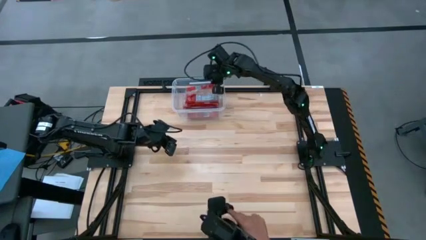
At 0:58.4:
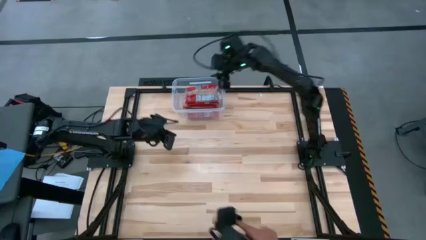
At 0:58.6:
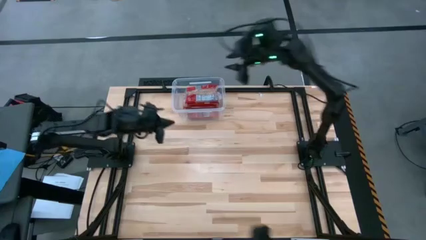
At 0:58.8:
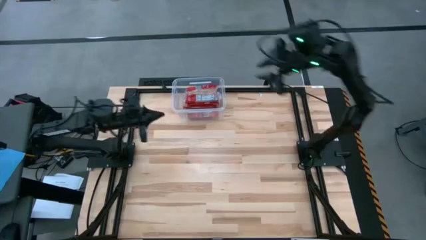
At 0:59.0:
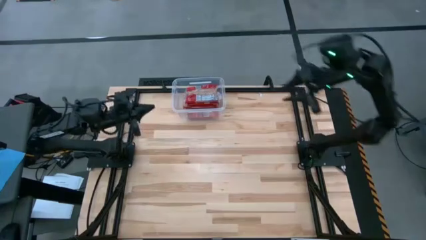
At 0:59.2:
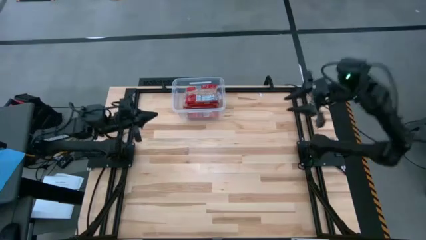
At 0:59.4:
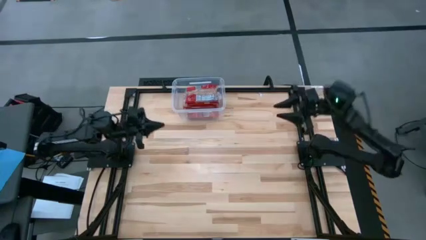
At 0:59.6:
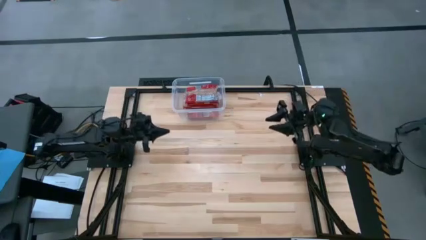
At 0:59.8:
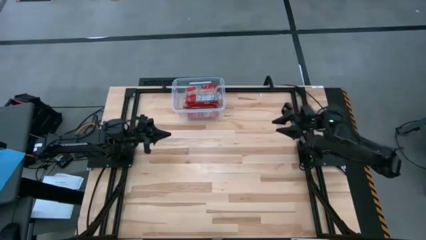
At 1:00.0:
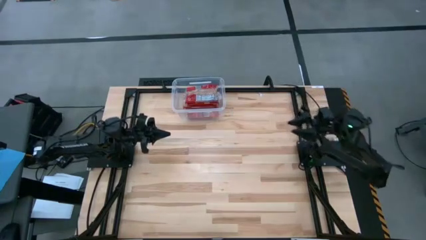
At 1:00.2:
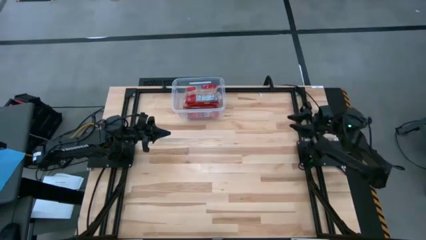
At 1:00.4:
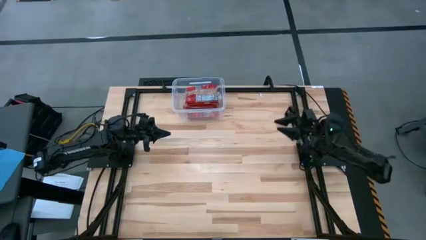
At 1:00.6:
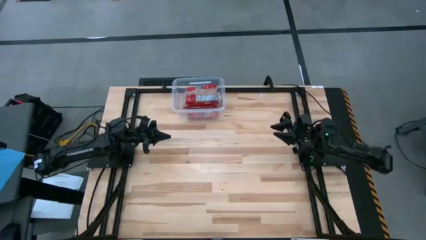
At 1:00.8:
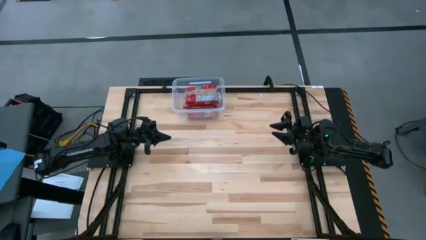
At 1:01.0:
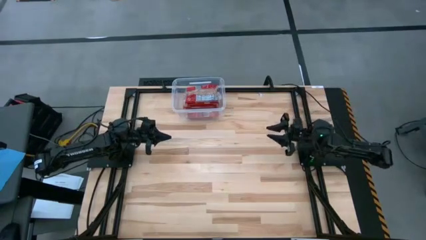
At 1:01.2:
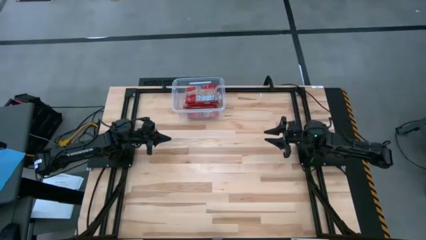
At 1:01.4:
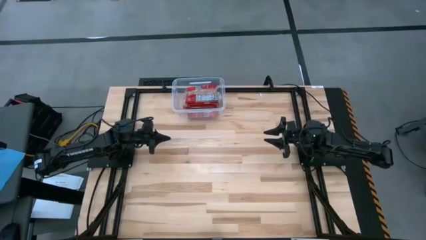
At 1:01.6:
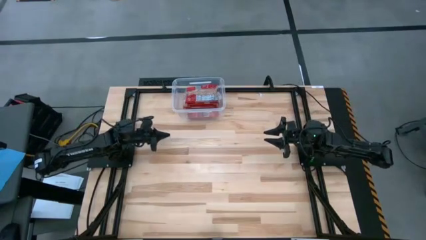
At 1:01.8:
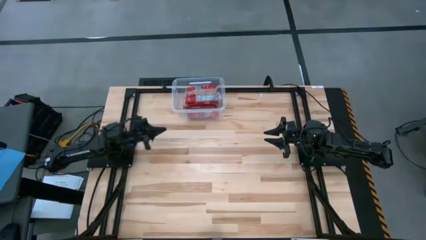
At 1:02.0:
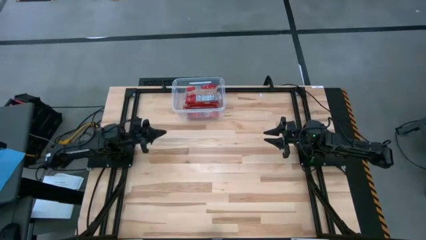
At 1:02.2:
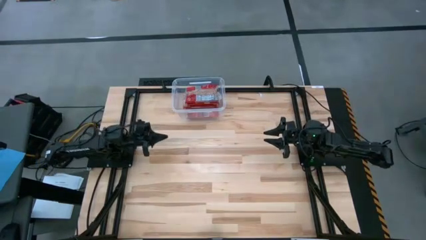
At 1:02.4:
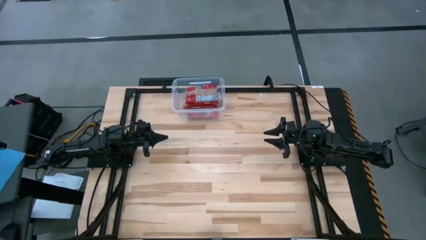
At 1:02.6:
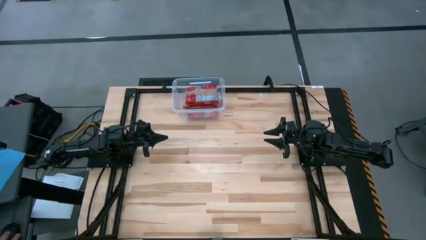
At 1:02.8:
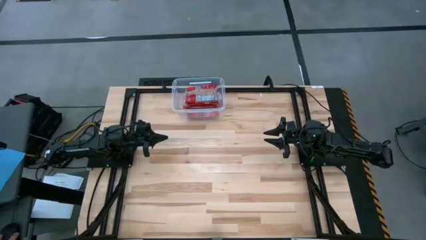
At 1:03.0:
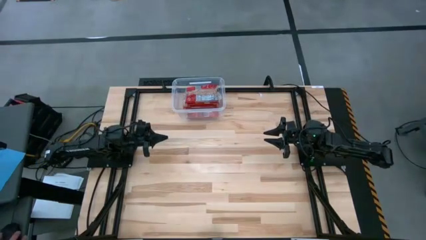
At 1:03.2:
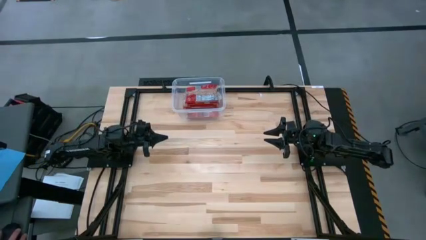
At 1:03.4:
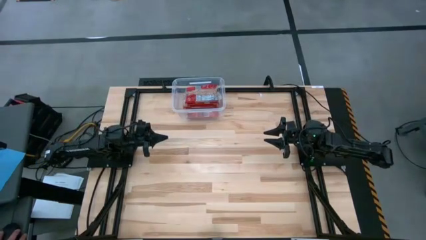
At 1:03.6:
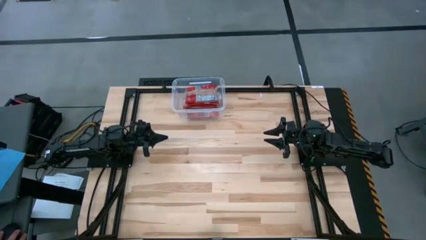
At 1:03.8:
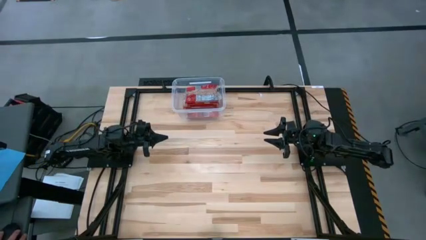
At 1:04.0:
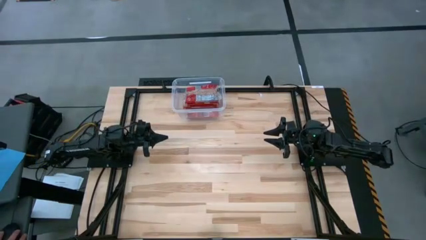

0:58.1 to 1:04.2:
Task: Sort popcorn bags into baskets
Return to Home Position

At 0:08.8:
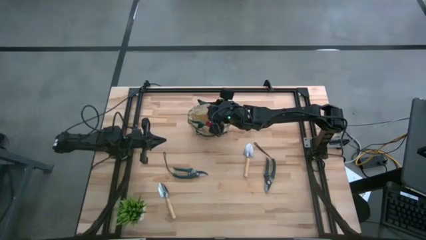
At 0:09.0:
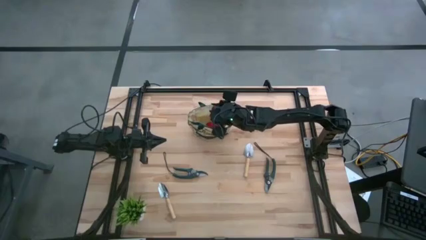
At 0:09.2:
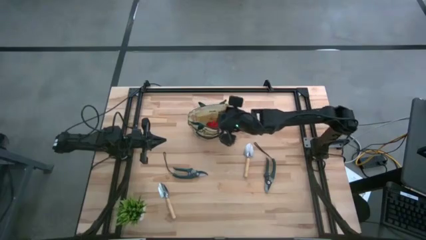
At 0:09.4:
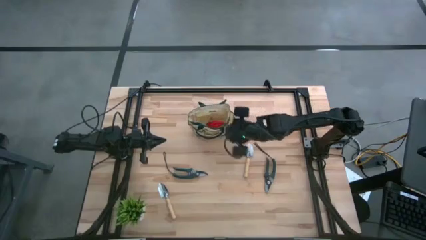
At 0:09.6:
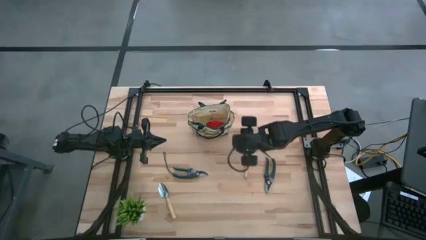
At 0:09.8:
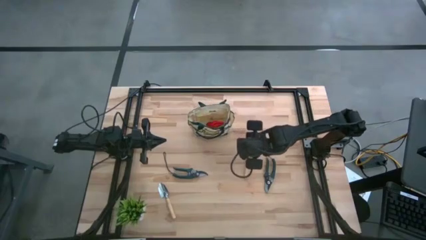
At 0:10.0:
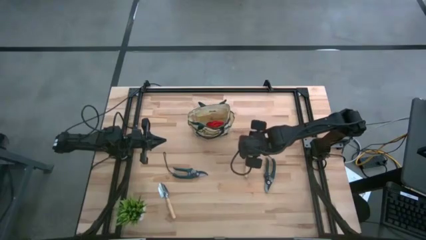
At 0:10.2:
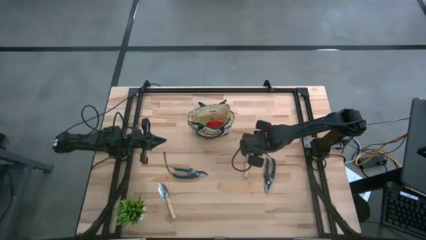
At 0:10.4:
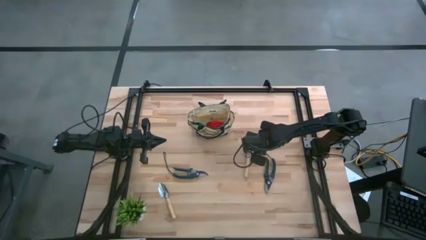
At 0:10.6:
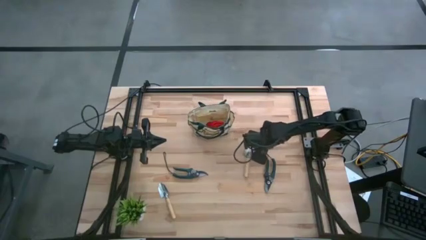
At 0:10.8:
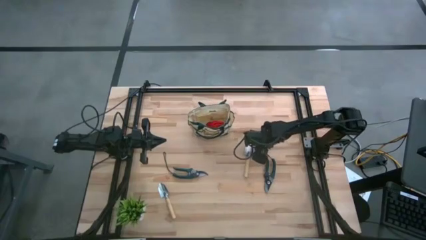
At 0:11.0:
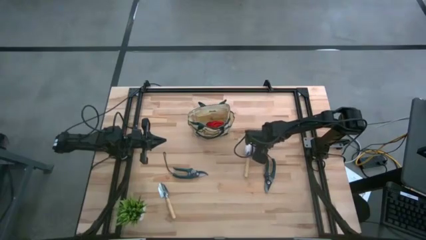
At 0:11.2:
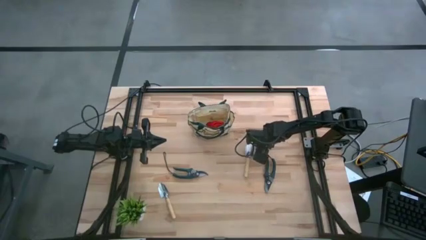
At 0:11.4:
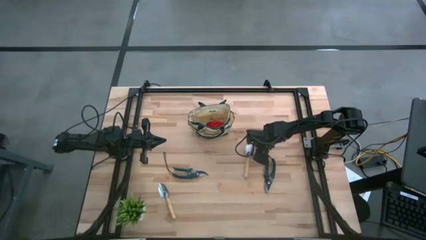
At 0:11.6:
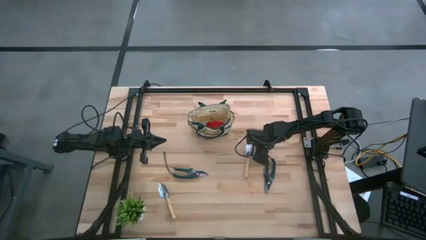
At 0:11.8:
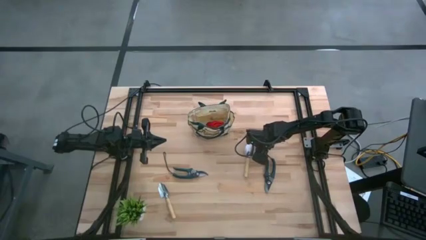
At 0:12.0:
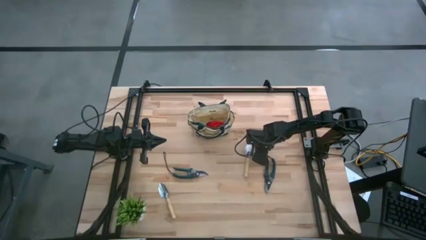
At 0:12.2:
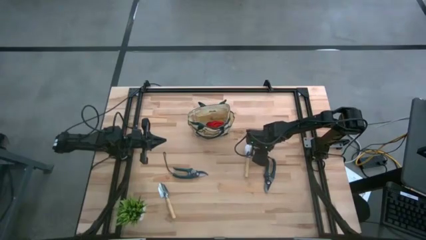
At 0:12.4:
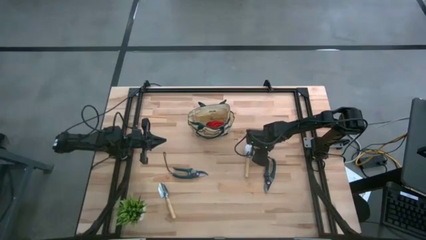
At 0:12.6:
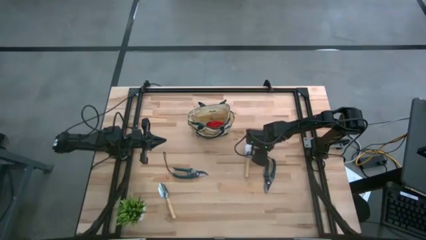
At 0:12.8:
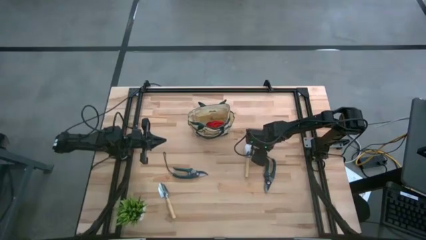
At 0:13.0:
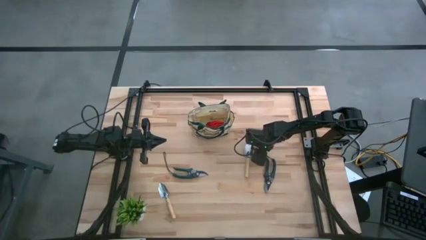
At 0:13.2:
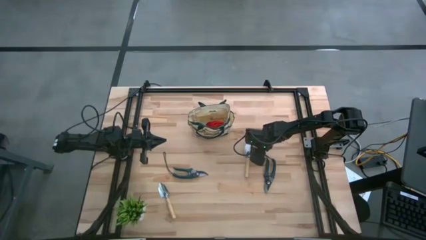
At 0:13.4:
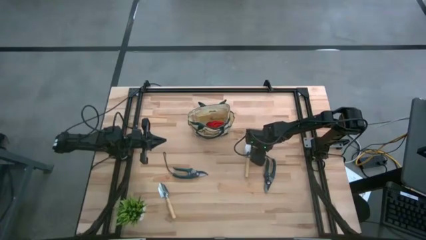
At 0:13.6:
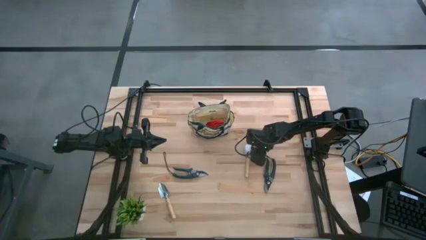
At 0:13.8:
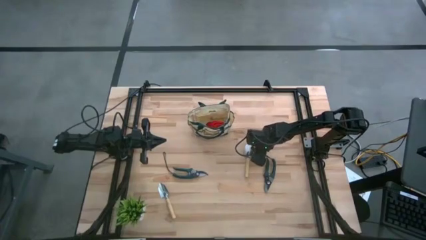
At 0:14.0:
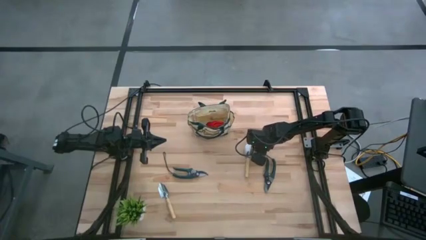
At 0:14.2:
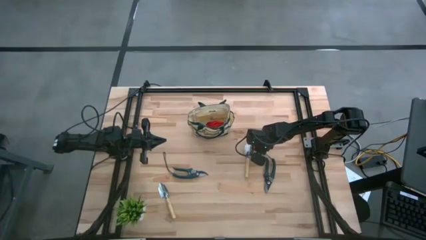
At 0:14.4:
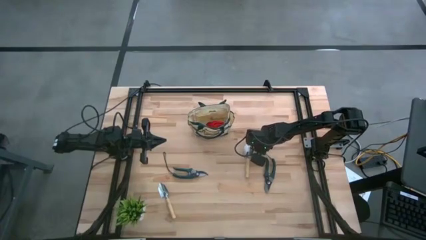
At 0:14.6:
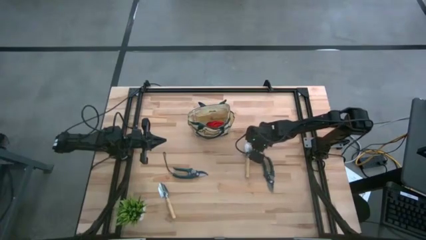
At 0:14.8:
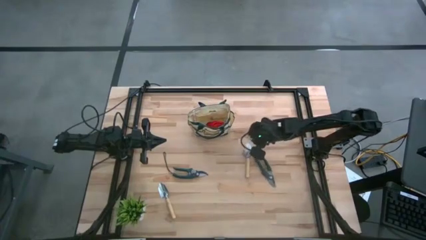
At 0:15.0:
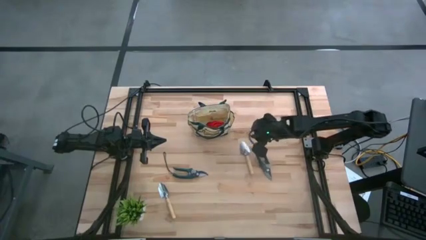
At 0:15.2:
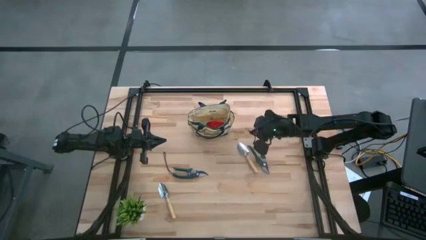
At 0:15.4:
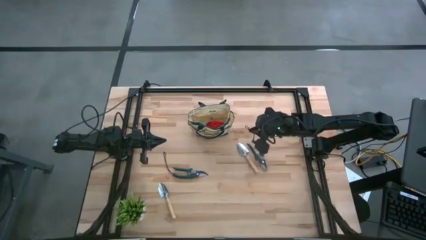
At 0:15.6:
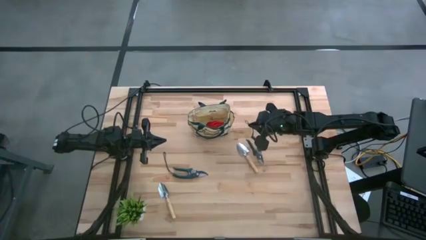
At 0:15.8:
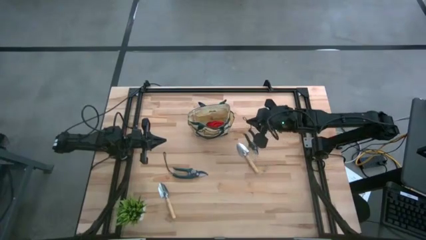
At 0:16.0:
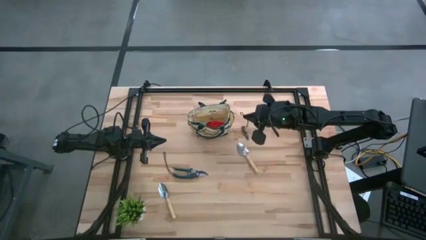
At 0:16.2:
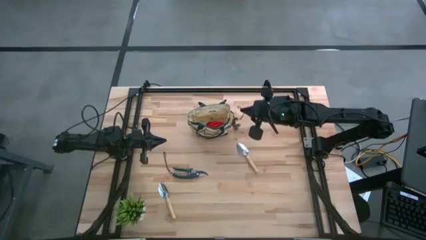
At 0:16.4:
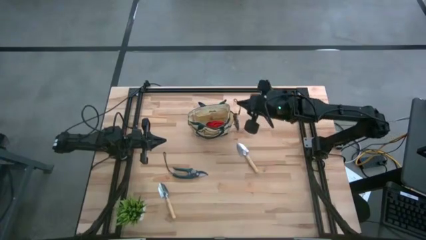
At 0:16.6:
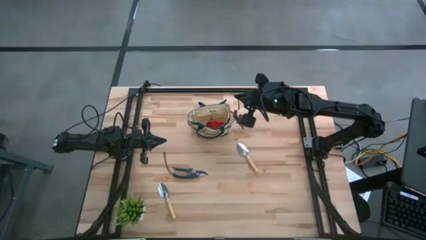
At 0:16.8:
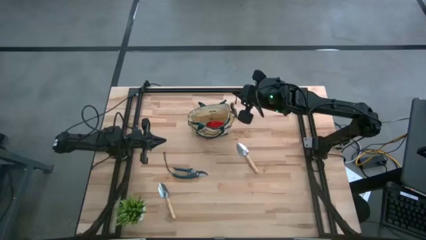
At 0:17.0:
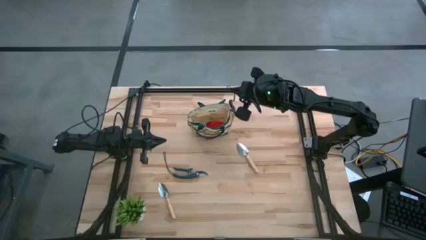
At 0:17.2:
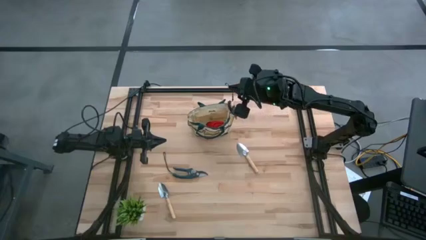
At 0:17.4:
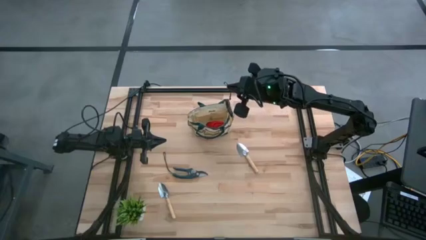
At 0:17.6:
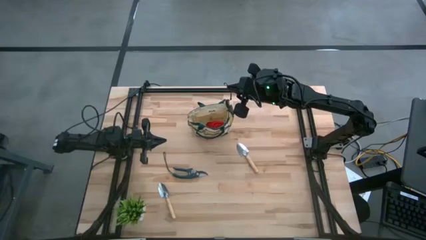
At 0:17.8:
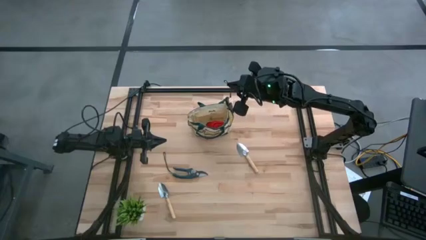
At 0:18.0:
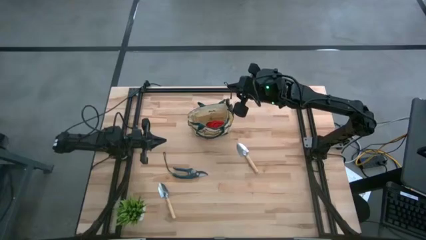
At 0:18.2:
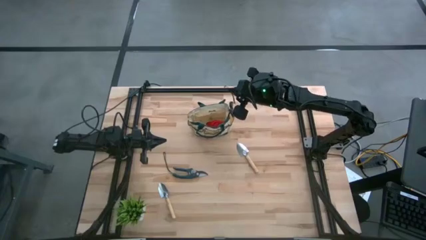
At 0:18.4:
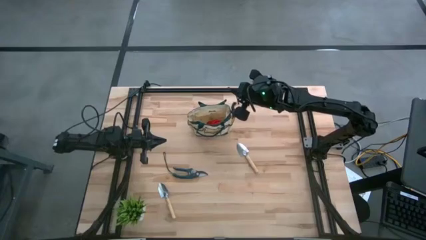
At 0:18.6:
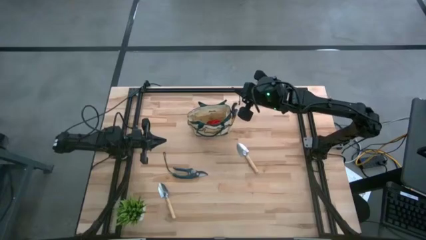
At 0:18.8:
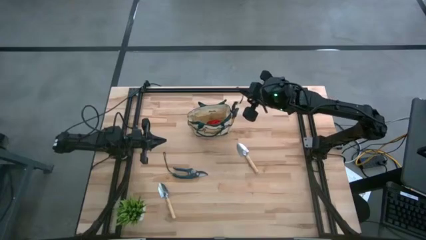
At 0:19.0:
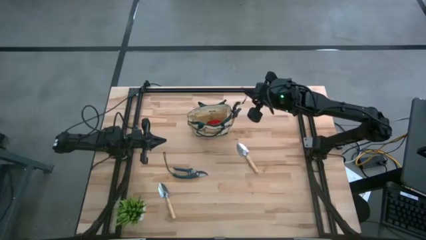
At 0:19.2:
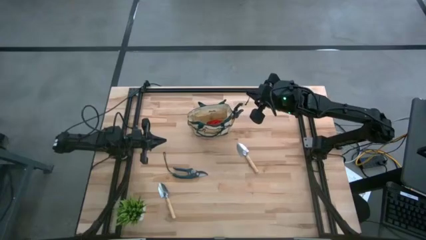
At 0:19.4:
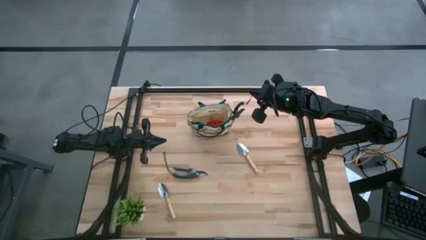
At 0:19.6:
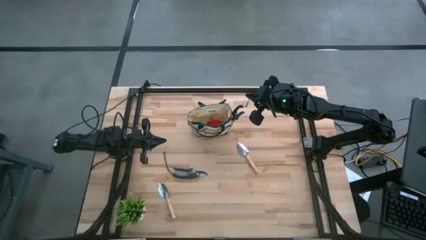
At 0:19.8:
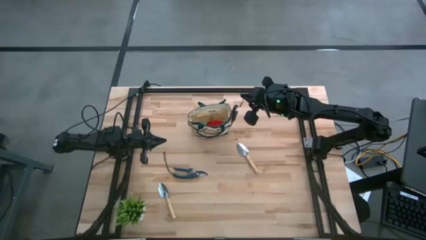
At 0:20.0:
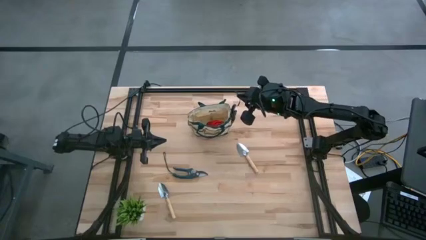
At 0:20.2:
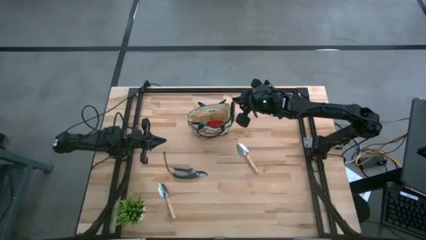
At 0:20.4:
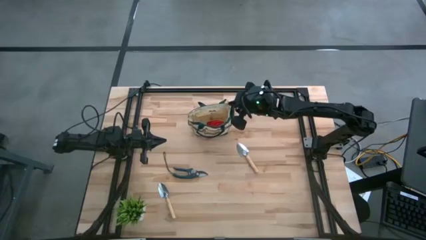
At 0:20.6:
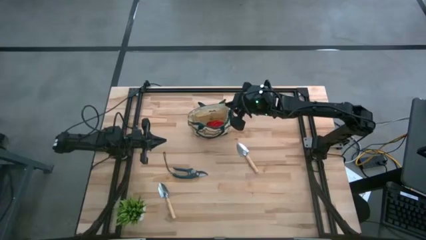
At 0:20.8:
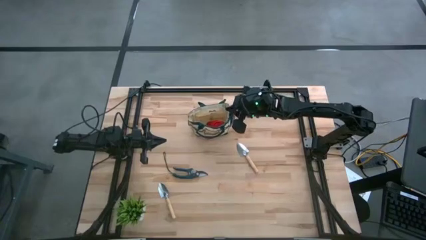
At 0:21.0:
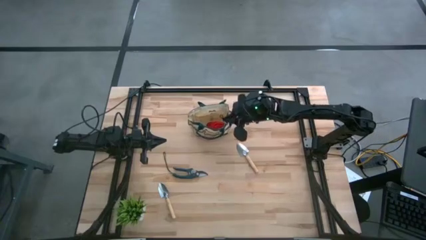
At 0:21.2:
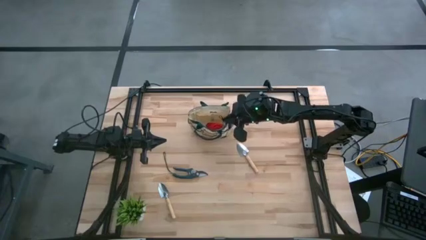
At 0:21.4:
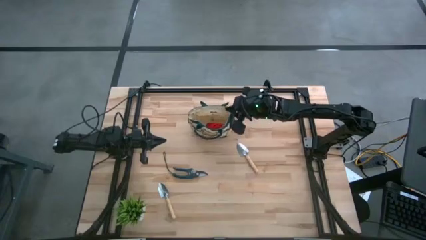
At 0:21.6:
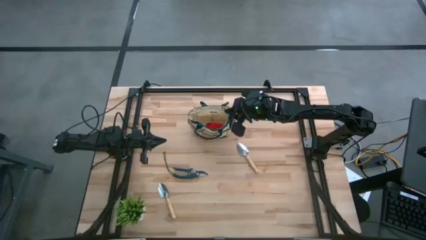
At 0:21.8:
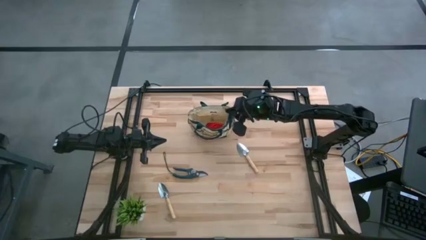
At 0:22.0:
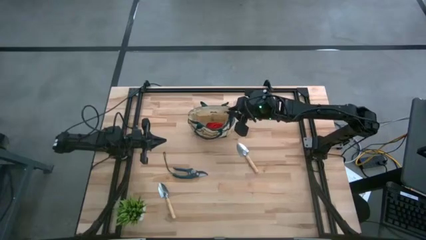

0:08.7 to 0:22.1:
Task: Pick & Place Garden tools in Gardening bag
Put the right green shear scissors into the brown gardening bag
